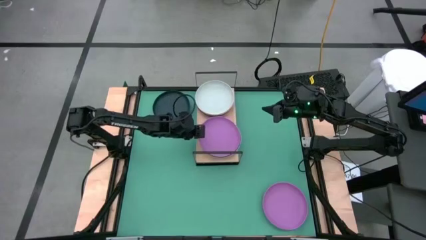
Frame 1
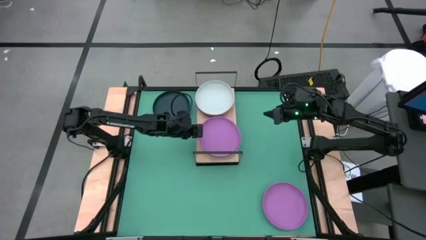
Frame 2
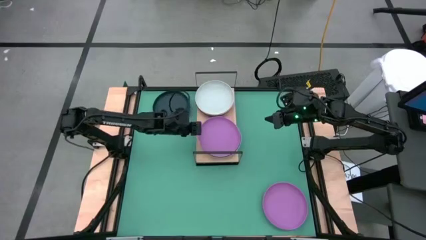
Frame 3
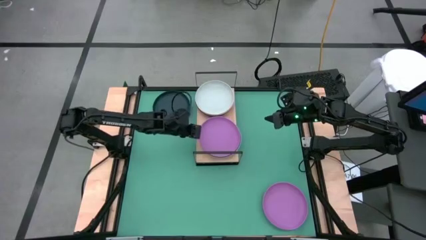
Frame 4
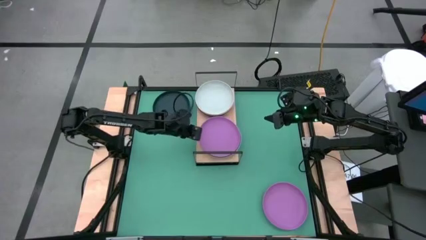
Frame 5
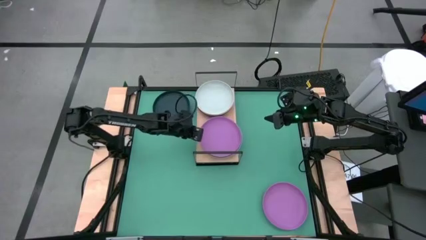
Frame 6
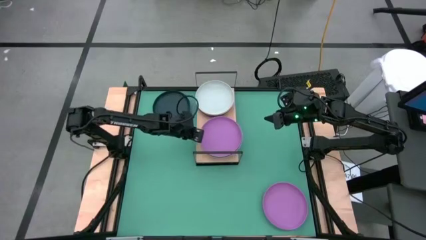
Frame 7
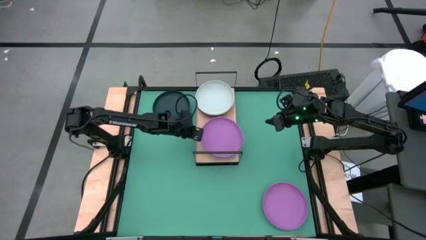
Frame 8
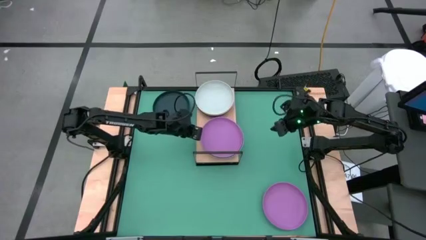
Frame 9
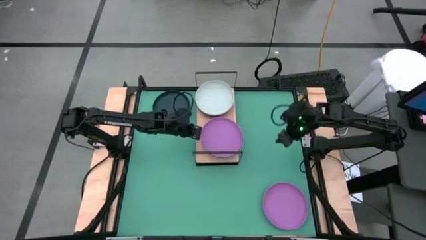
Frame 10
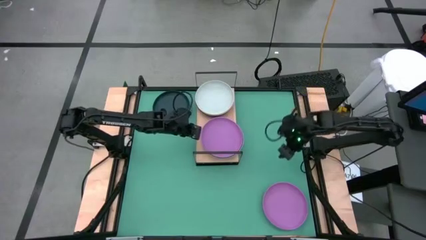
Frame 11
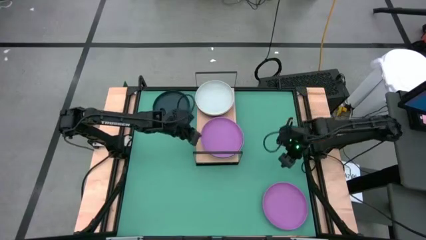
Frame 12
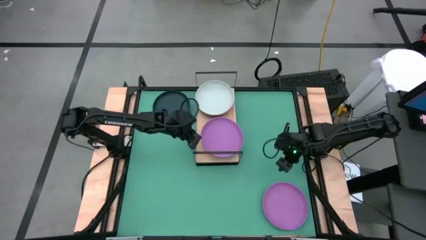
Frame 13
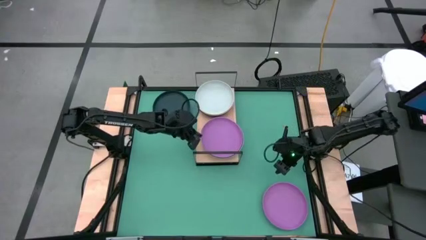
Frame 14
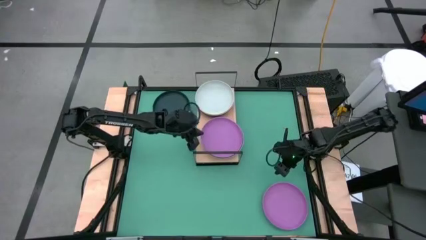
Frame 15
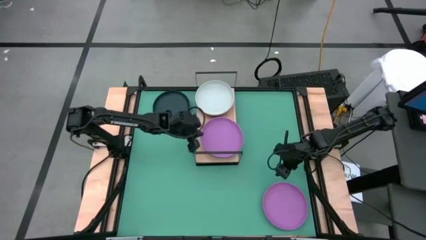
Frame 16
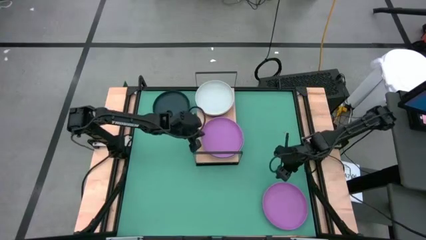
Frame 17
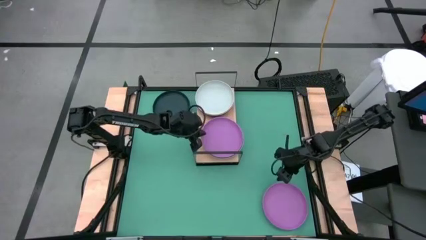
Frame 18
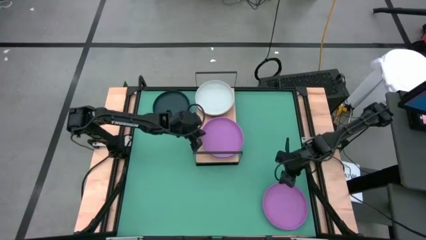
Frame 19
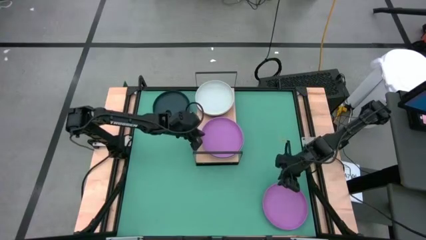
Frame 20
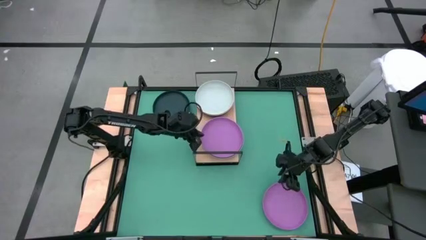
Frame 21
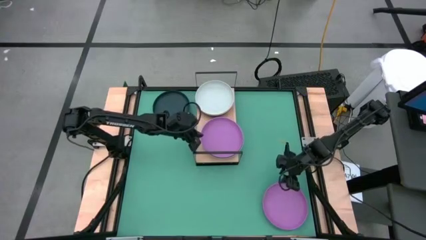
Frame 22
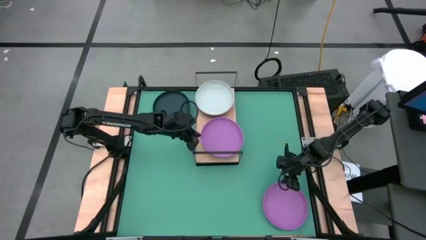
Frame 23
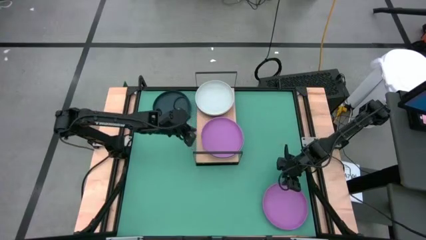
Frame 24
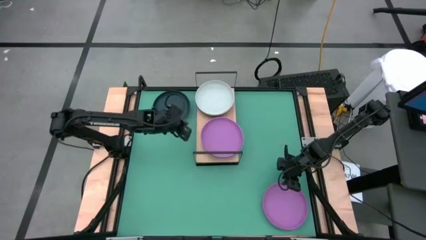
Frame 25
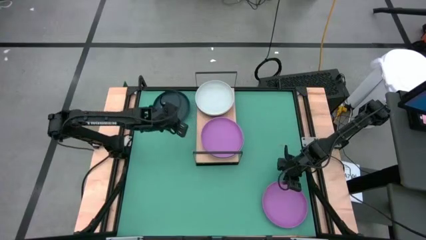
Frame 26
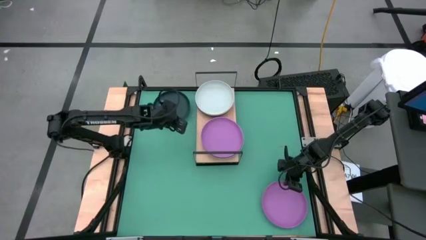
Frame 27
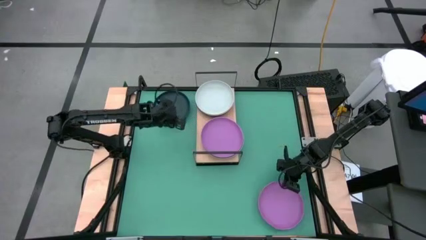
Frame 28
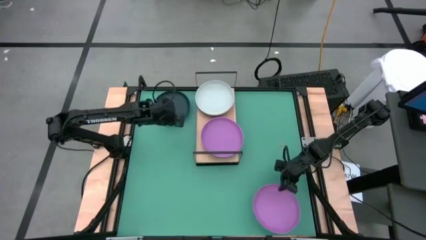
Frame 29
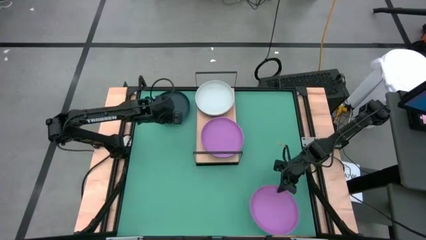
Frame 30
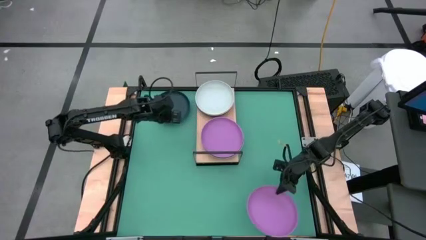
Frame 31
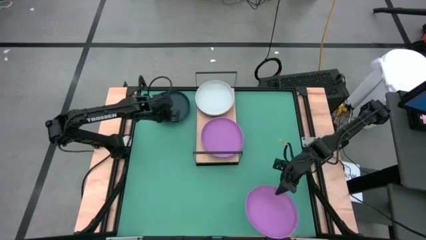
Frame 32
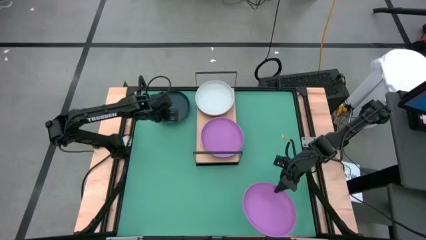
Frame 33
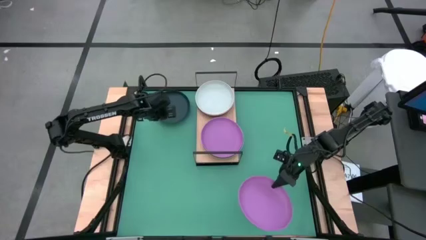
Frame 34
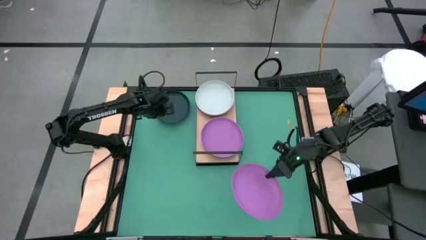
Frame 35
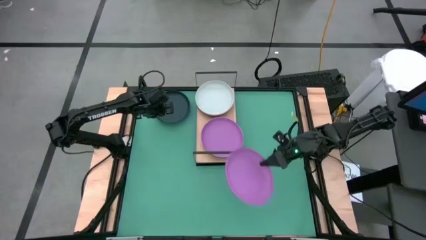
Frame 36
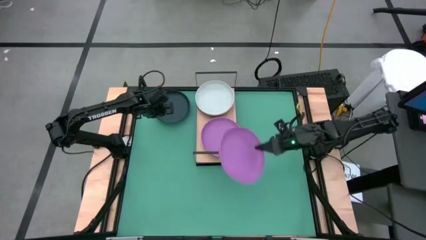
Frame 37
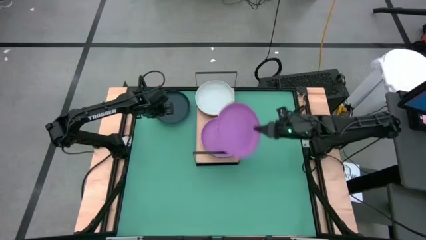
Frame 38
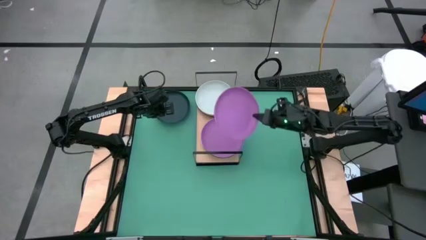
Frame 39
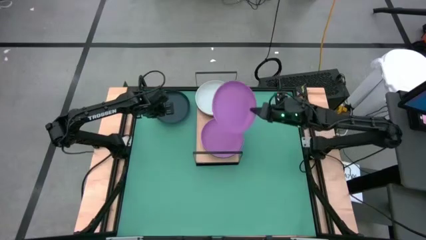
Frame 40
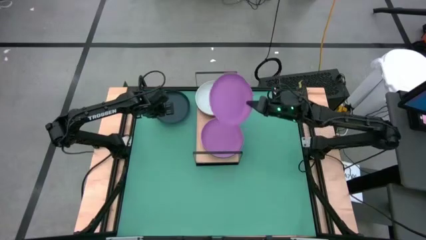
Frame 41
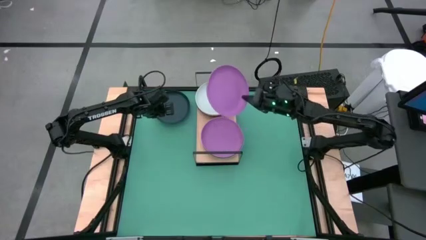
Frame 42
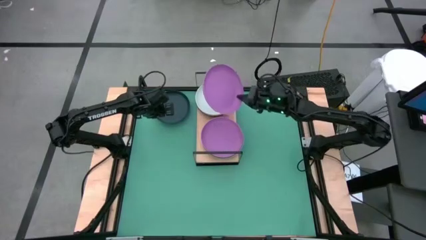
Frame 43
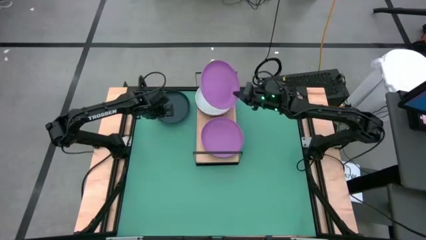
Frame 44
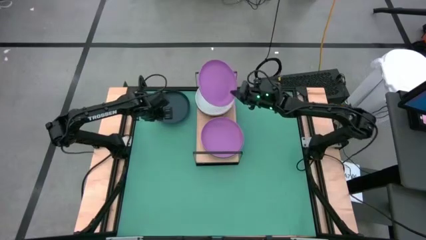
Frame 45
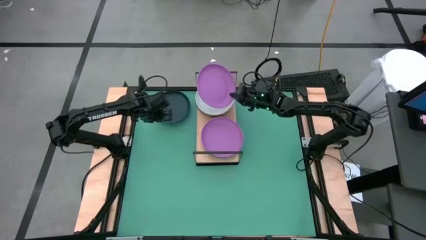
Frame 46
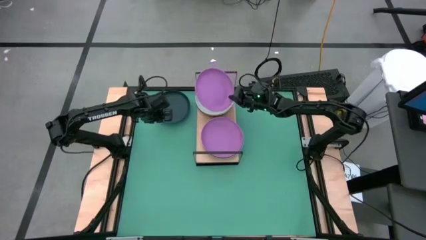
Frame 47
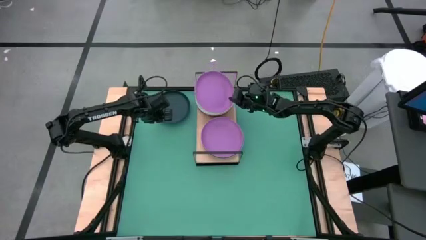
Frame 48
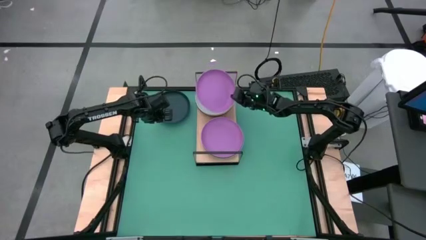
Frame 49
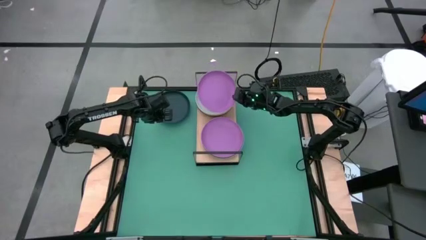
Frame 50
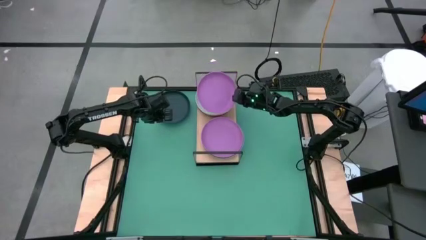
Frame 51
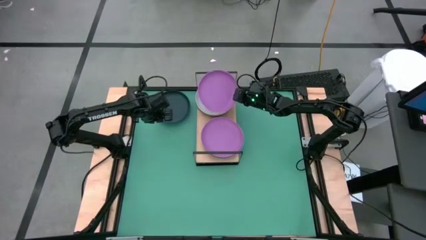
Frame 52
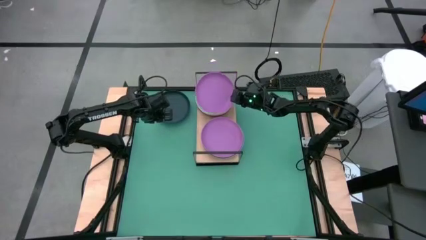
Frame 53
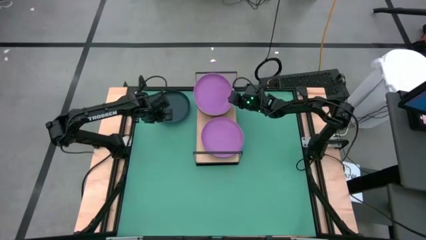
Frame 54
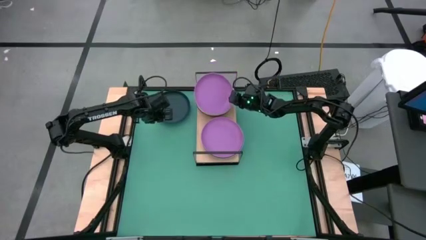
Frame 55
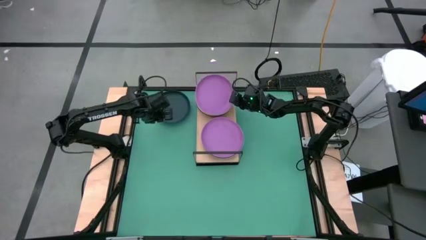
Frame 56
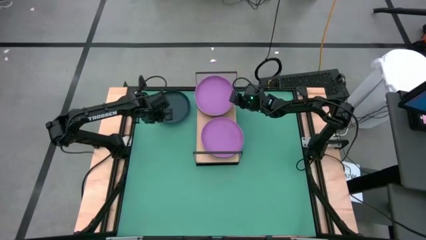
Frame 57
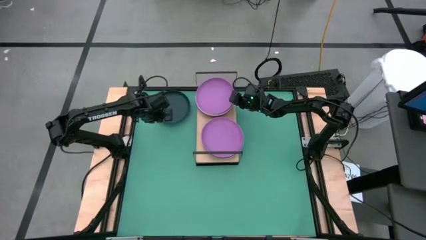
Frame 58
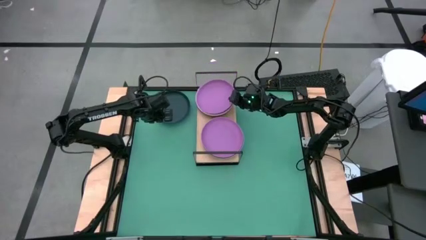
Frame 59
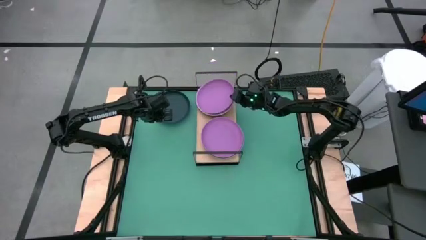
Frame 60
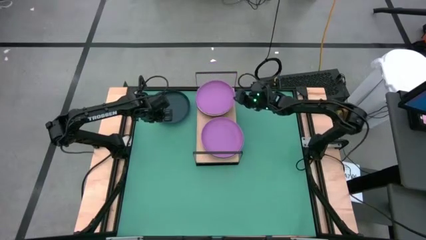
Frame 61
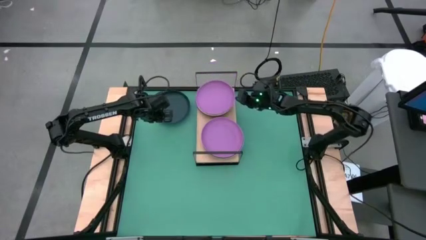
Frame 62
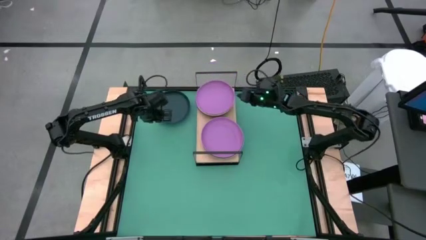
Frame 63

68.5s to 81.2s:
Task: Place and stack plates onto a shelf
Stack the purple plate on top of the gray plate on the shelf
